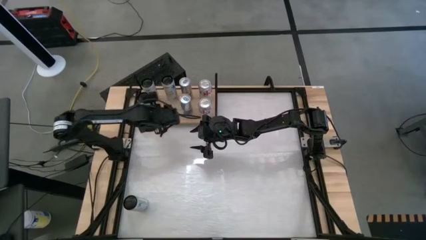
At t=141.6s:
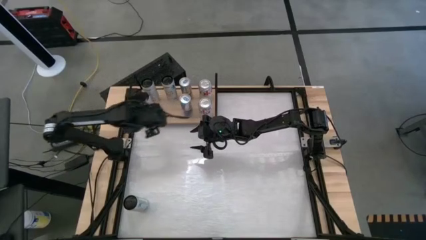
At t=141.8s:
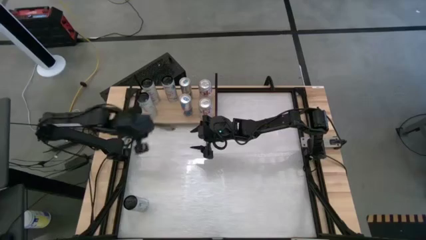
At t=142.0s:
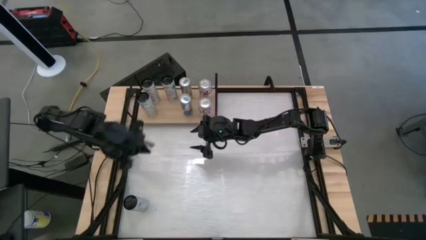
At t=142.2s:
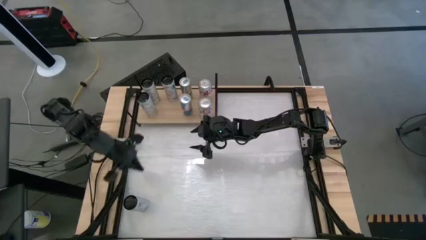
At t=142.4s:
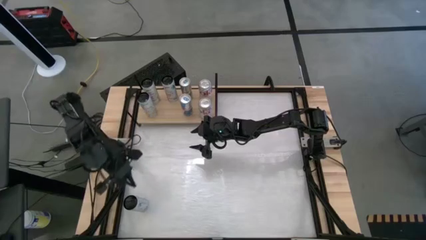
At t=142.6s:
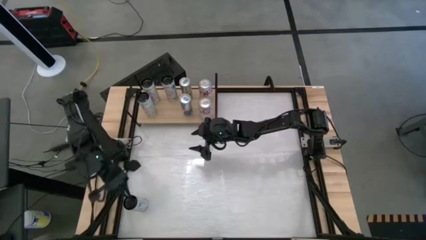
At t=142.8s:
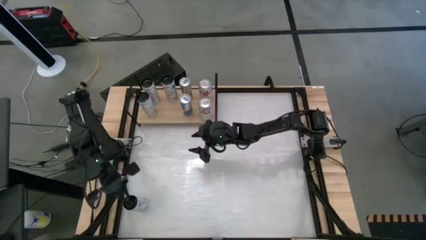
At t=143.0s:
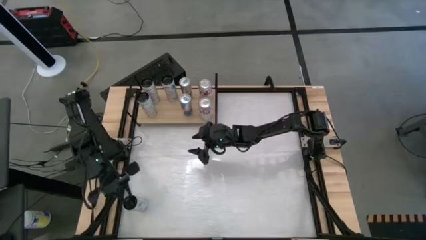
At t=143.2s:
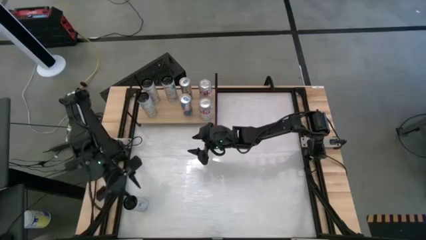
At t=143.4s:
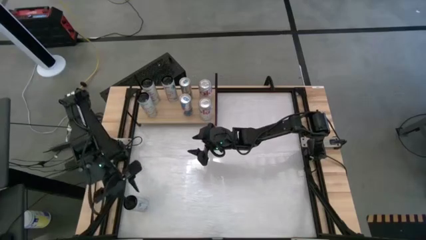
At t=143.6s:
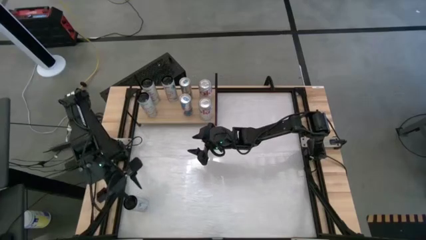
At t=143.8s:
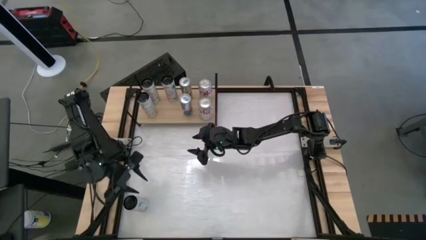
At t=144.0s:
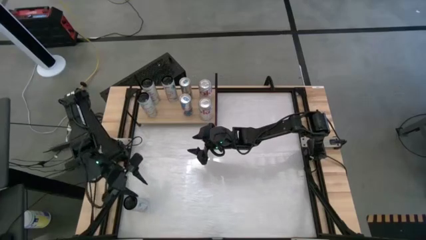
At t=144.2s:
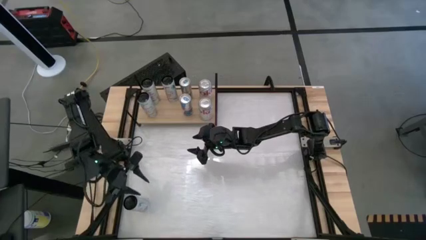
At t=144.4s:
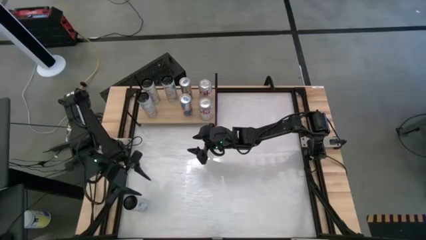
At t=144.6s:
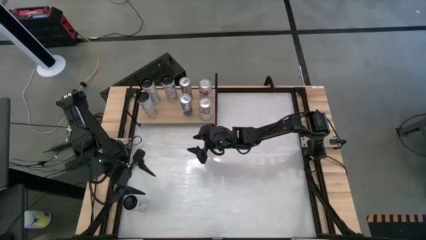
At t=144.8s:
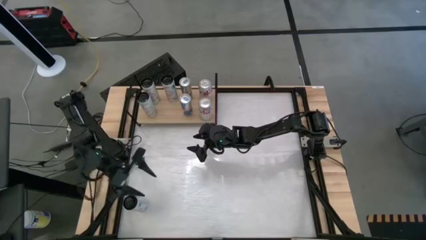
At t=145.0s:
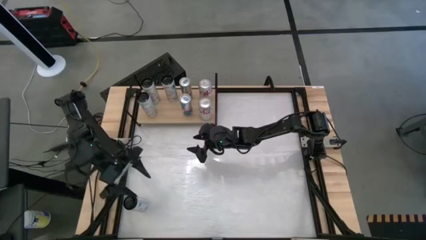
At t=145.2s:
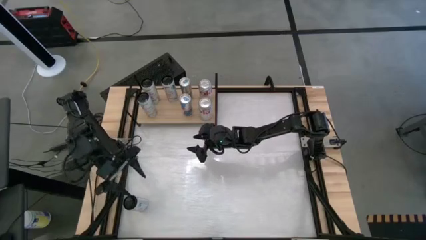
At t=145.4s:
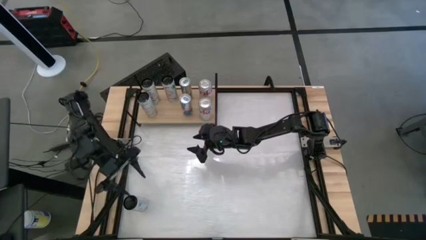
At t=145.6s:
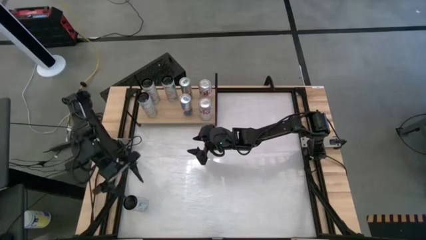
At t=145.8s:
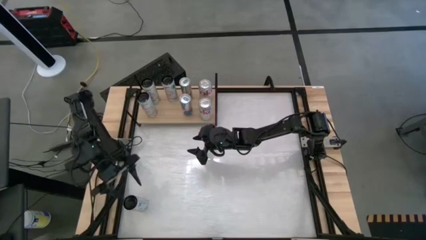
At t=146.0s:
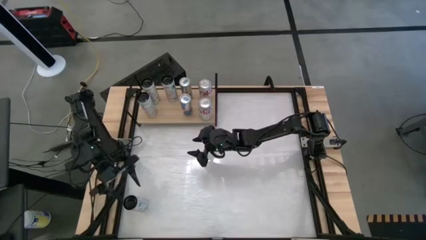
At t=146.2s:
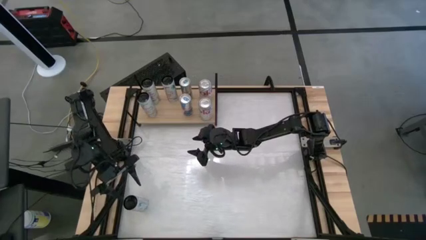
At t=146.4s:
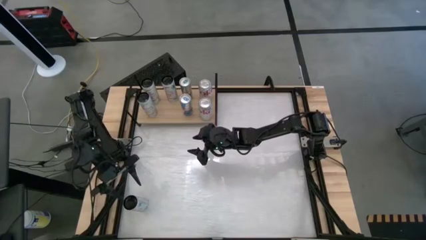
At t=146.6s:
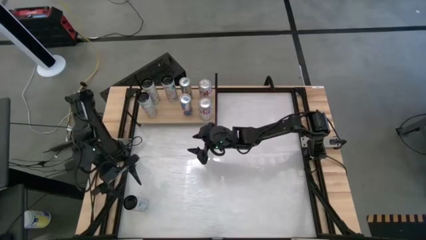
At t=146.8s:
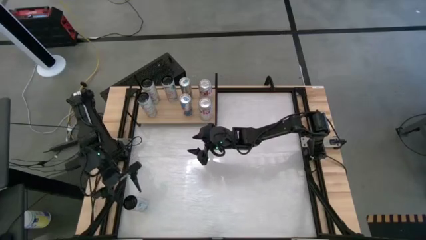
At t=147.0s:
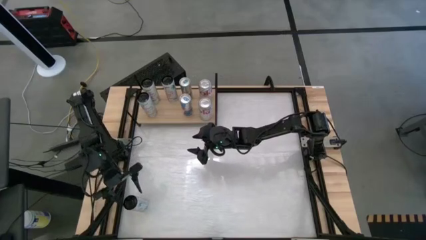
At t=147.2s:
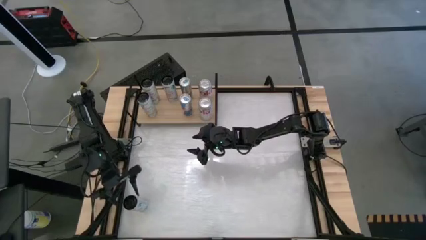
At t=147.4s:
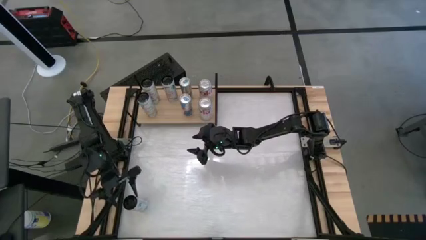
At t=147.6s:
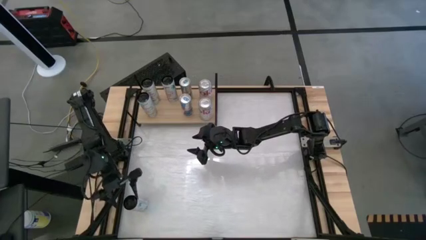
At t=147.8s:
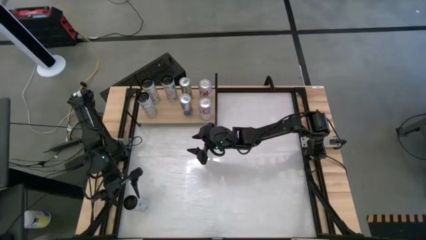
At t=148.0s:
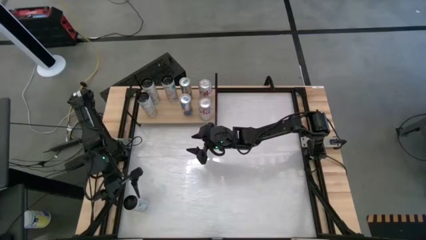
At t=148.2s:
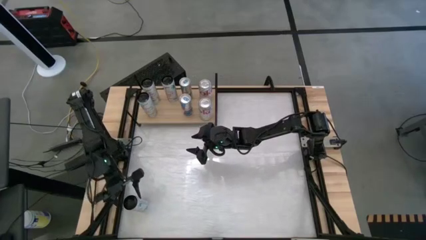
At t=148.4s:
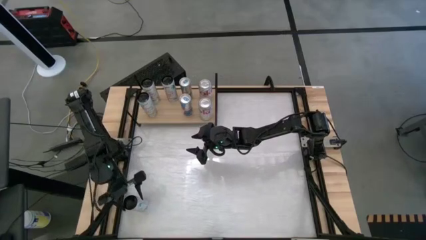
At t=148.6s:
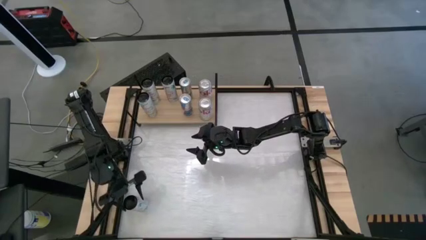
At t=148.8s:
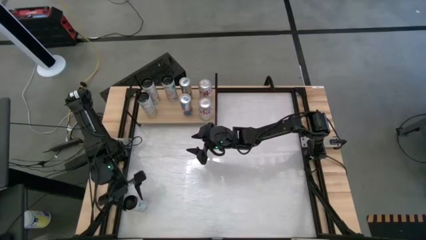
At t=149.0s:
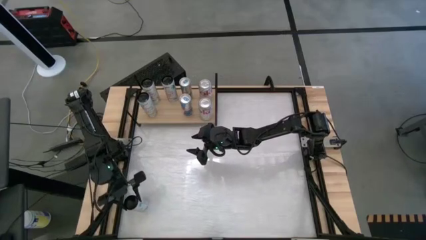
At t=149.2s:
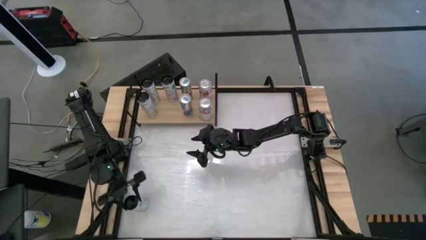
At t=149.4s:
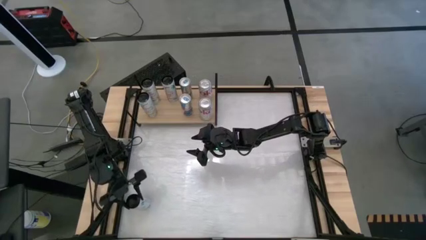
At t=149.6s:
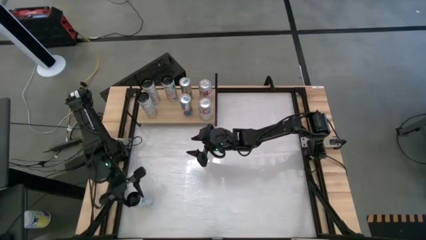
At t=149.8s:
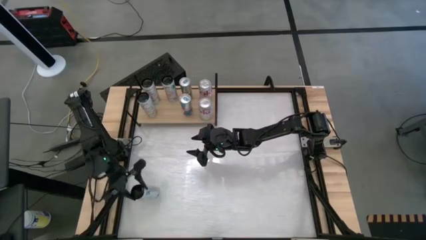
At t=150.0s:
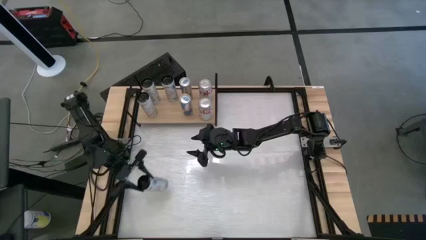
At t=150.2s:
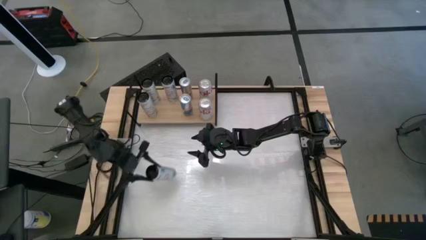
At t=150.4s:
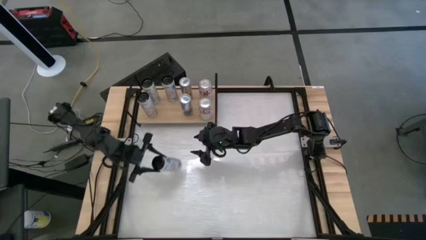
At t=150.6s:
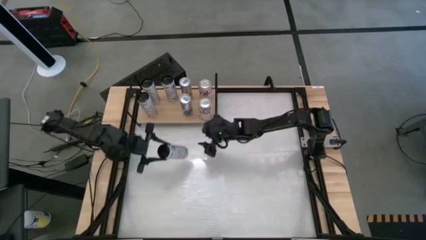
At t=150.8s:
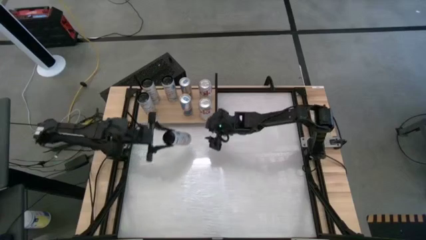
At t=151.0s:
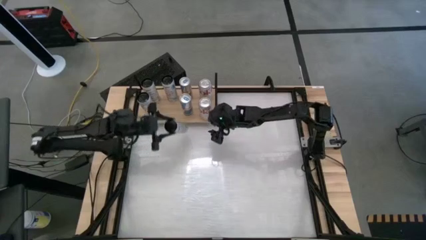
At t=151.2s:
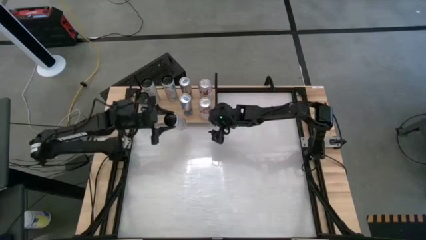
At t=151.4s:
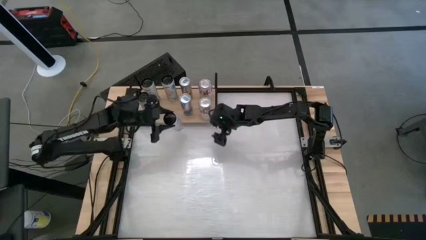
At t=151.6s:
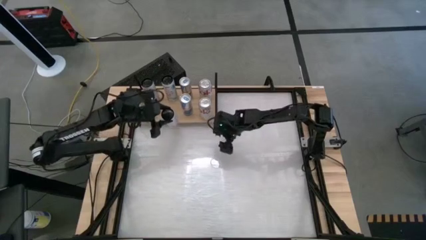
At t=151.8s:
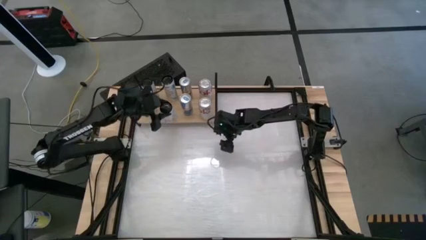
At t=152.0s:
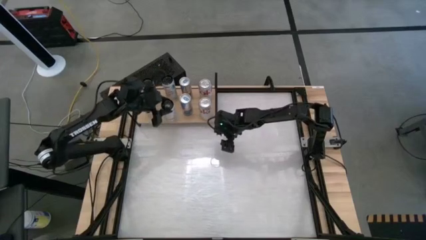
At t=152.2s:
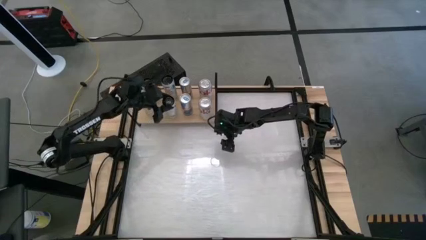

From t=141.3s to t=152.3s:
Task: Place canned beverage on shelf
Put the pink soda can on the shelf aligned with the other pink soda can

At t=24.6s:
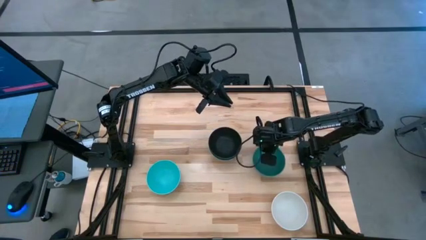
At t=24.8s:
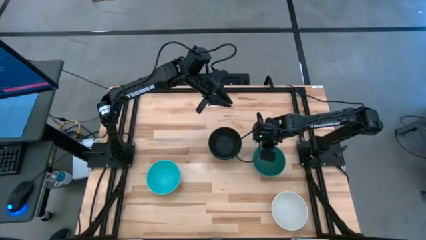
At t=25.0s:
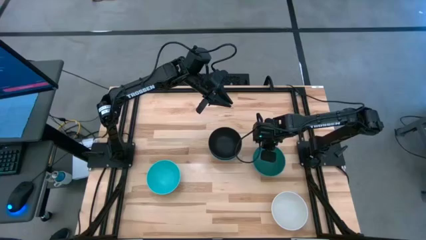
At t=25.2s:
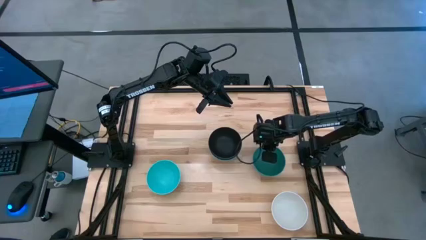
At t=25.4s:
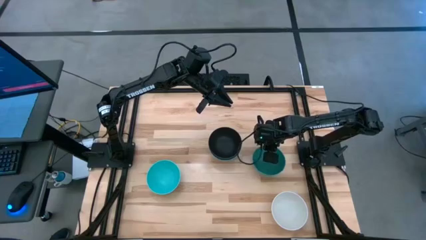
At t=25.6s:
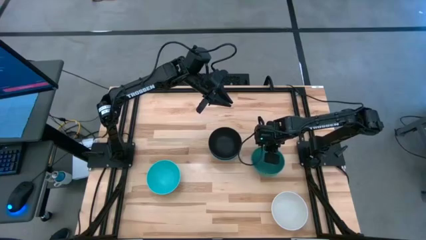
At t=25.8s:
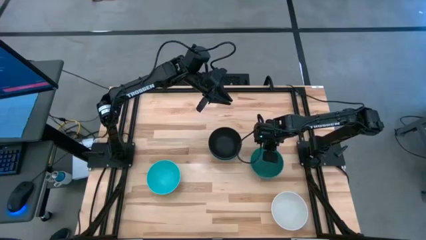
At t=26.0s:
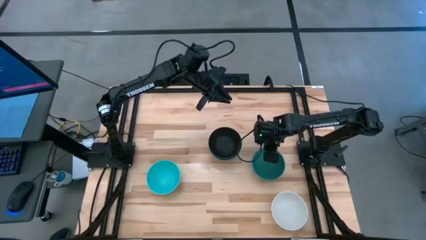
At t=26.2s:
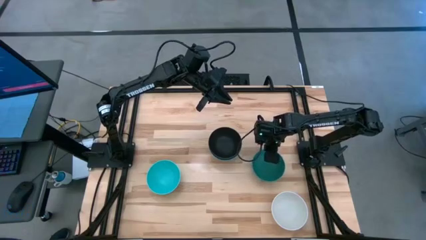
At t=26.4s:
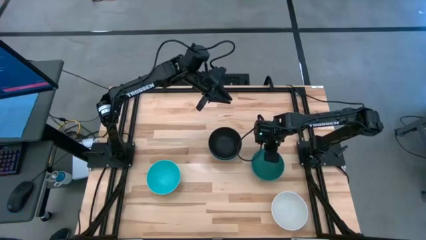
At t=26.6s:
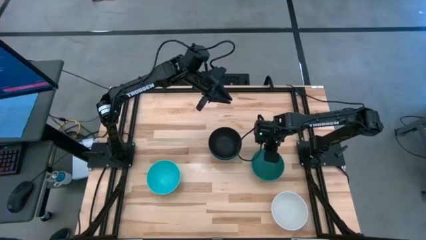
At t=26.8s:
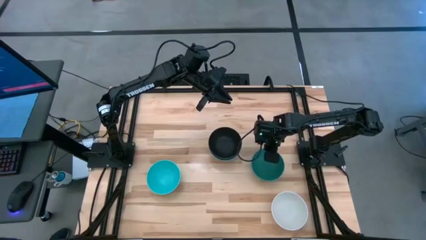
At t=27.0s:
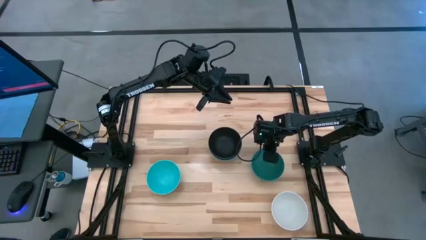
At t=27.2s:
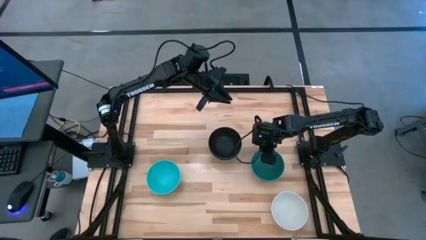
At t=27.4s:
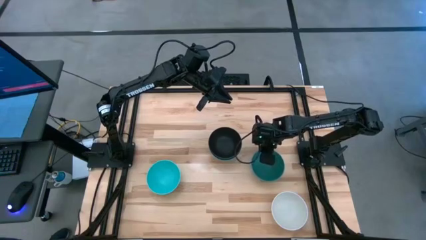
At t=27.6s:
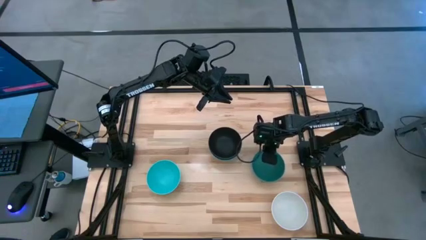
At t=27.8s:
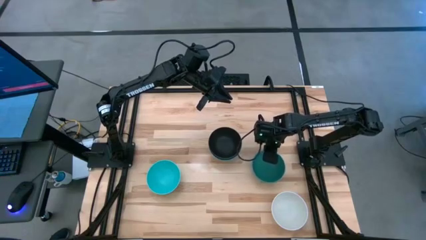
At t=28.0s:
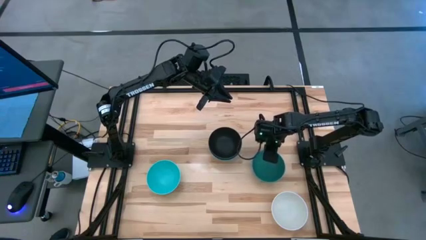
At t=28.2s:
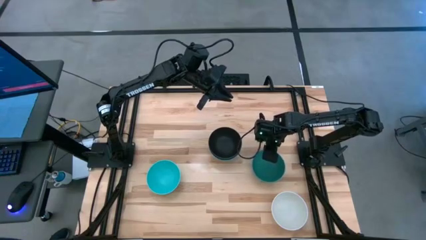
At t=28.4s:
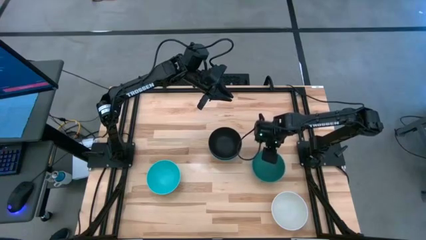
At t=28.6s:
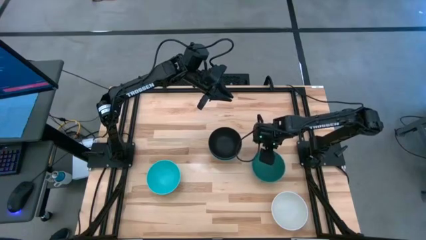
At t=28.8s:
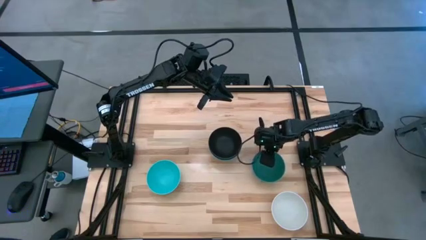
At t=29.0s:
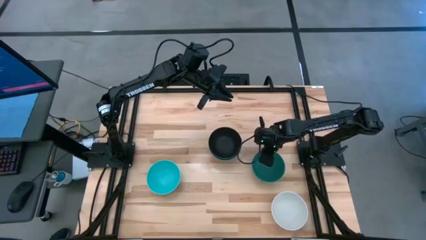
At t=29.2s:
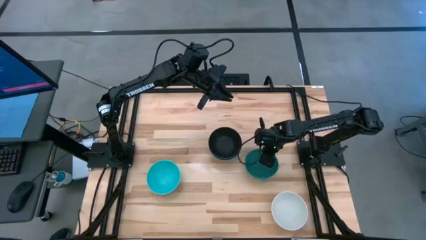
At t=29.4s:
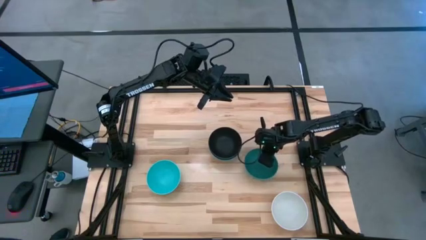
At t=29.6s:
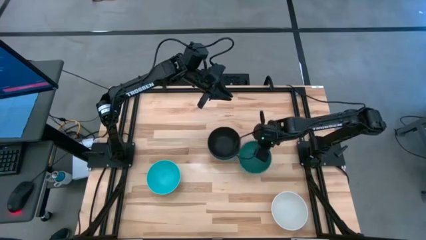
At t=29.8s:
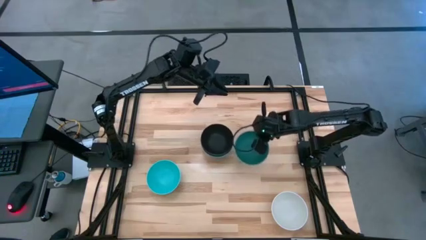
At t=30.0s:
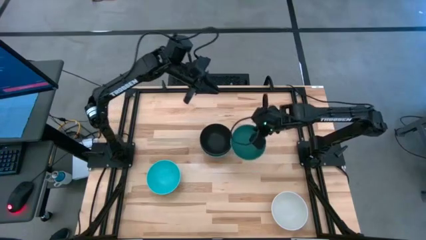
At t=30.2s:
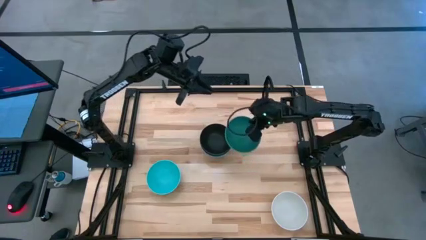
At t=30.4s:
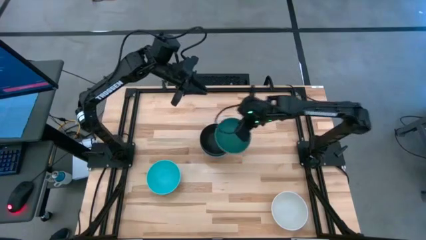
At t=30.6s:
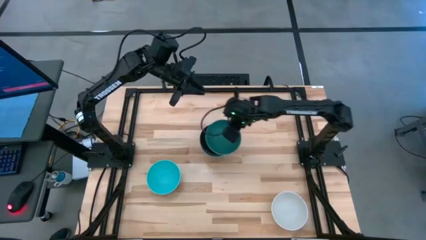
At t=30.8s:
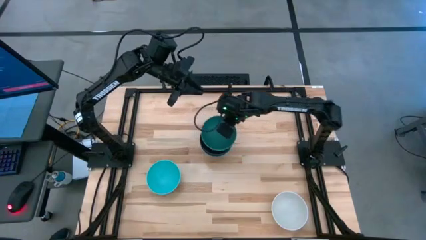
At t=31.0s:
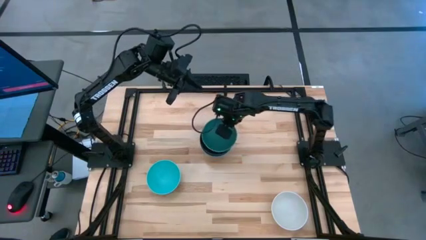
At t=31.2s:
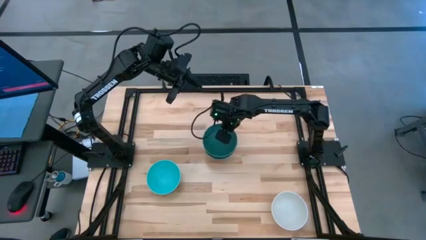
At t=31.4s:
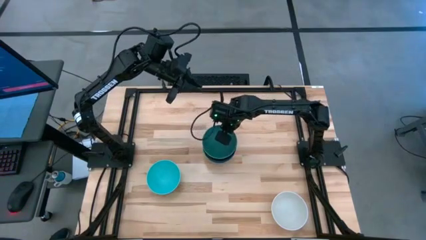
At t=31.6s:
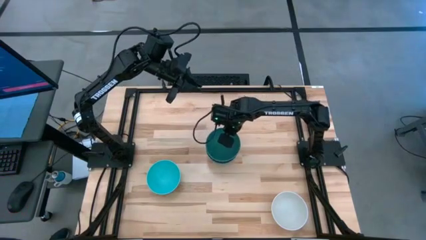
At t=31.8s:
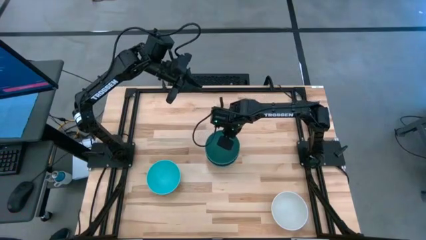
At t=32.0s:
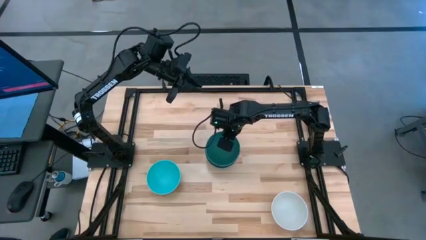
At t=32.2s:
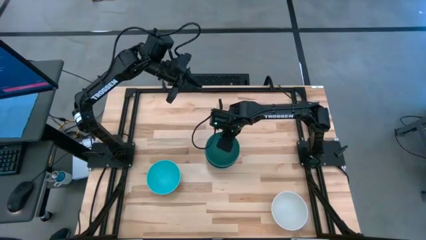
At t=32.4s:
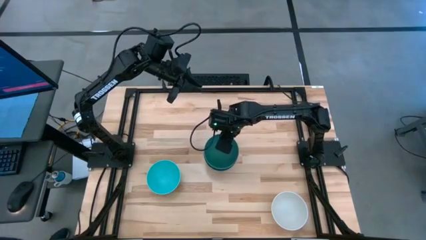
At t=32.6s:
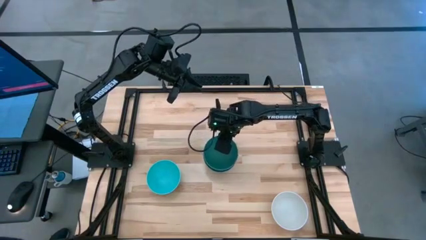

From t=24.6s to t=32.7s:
Task: Nest bowls inside each other
Stack the green bowl on the black bowl
